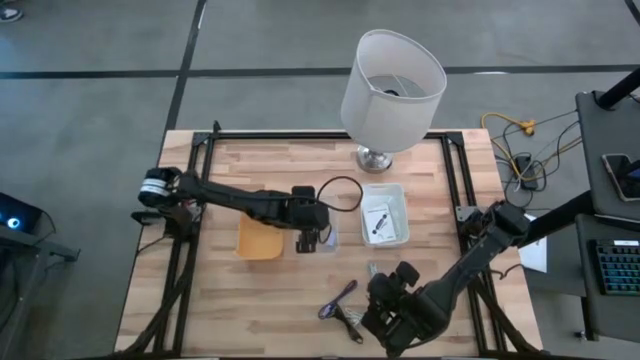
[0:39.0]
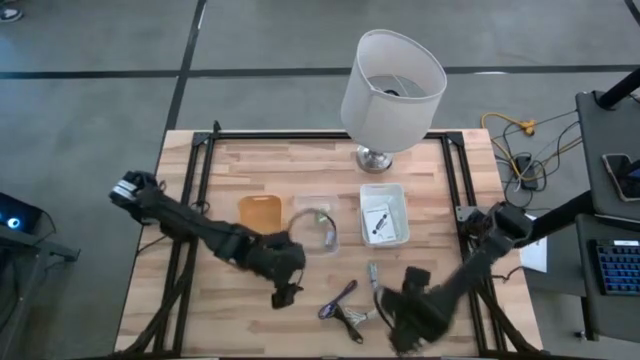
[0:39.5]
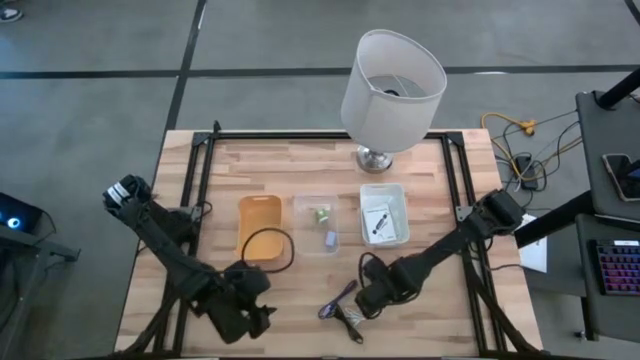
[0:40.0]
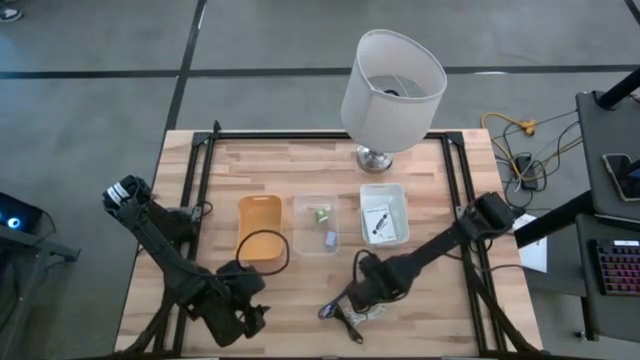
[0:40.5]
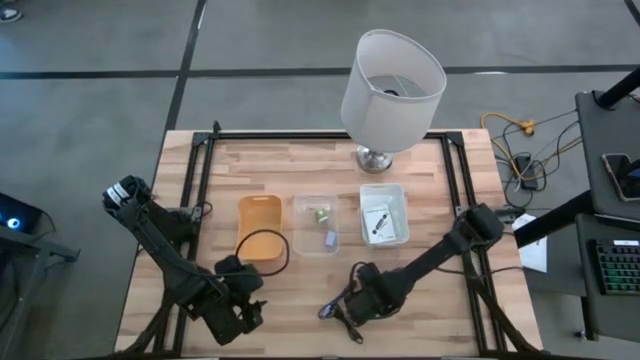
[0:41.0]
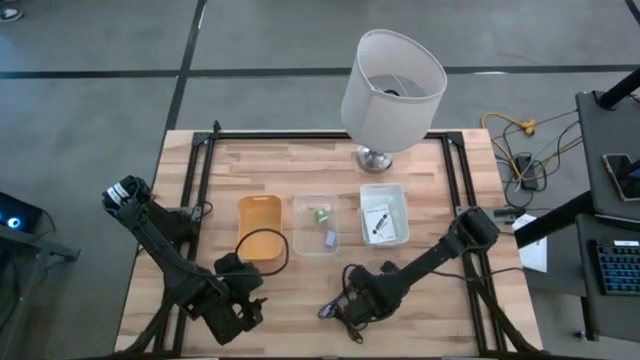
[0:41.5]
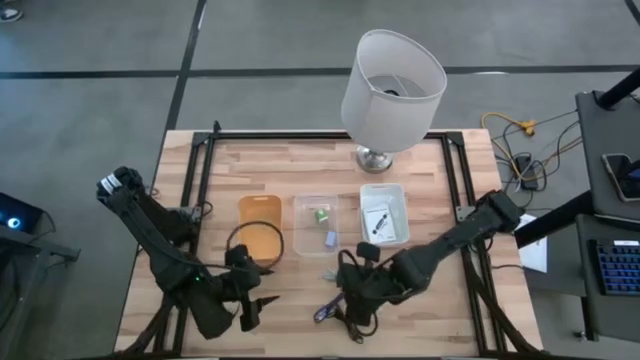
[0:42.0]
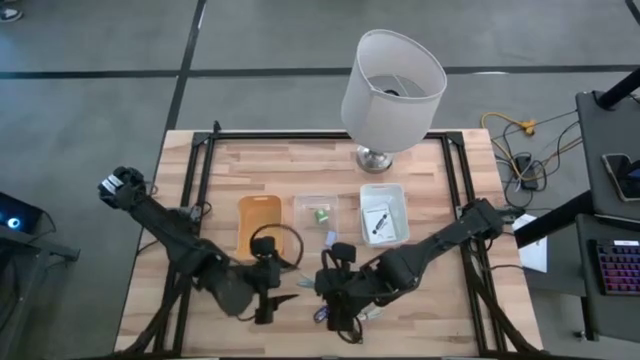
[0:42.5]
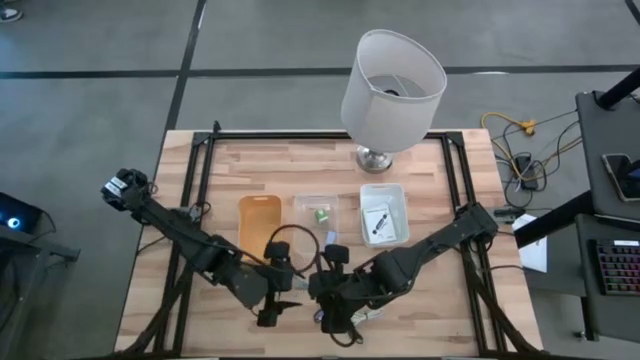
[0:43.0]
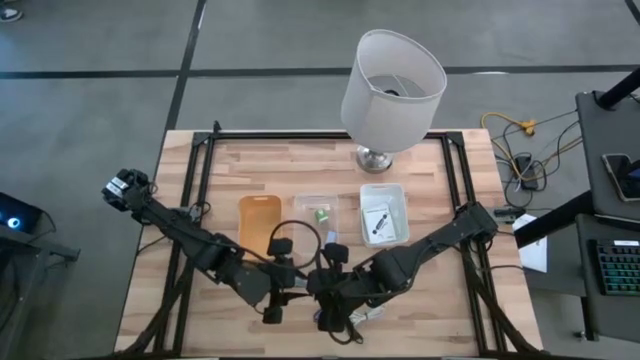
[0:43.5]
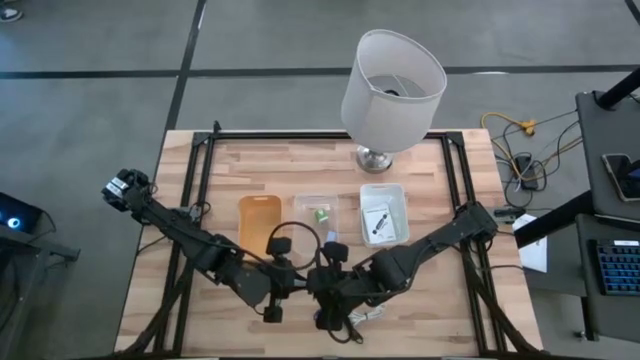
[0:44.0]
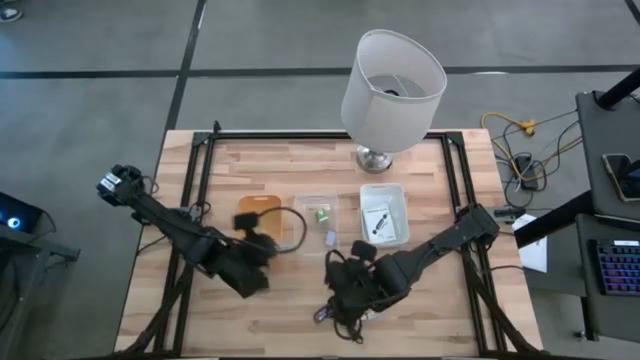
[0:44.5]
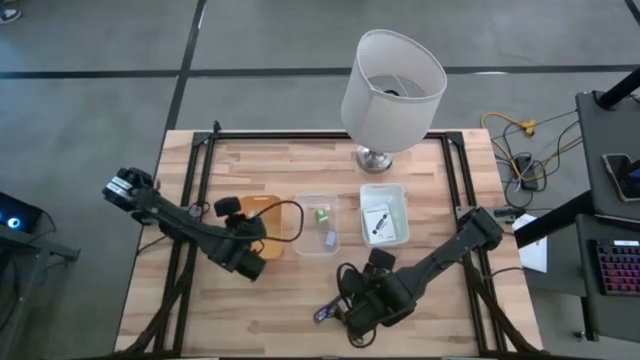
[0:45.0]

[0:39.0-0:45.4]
Task: Pick and place items into bin
Put the gray charger cable into the yellow bin

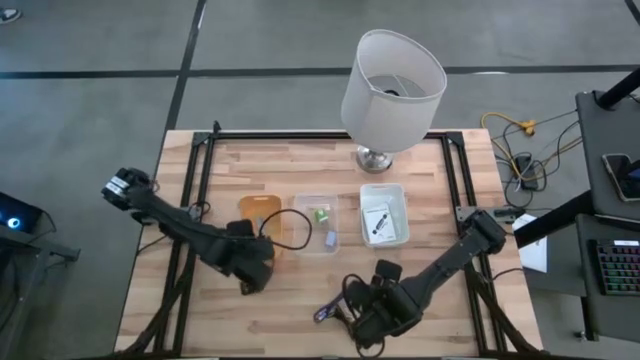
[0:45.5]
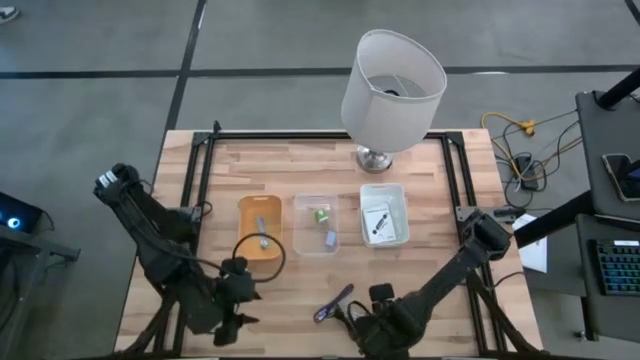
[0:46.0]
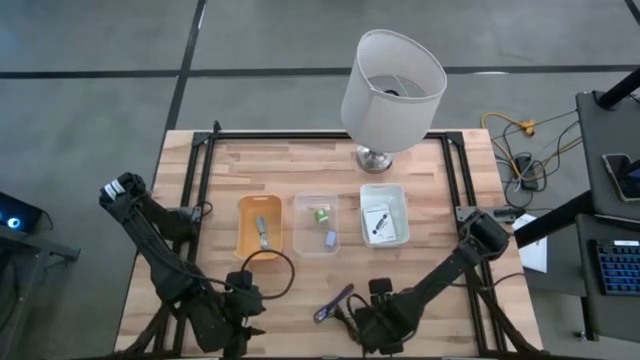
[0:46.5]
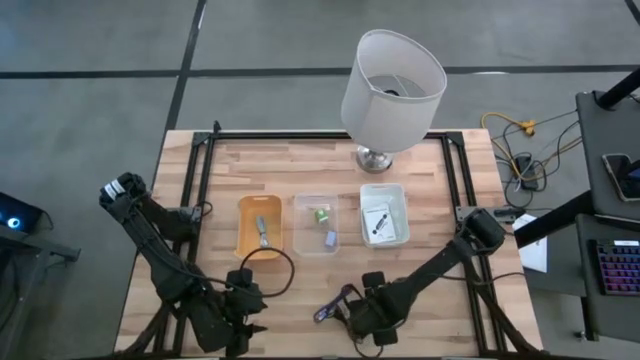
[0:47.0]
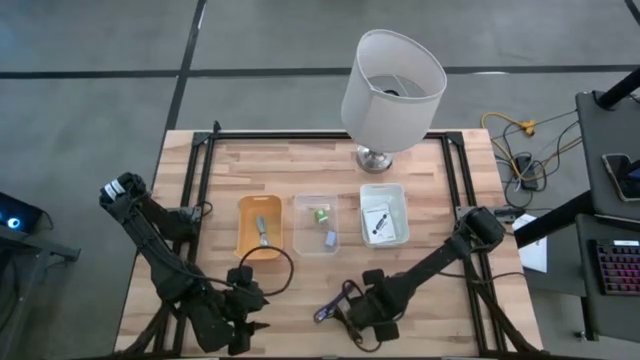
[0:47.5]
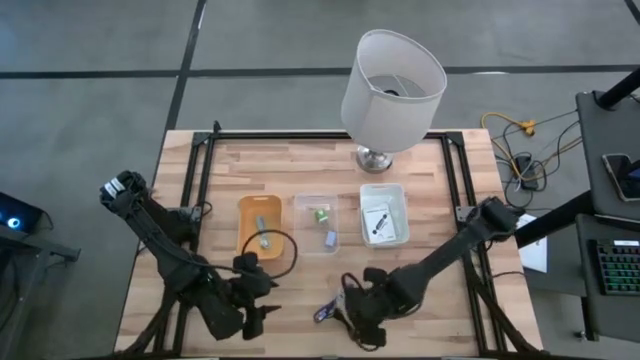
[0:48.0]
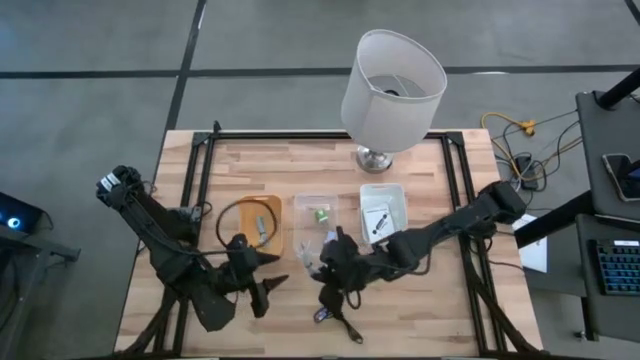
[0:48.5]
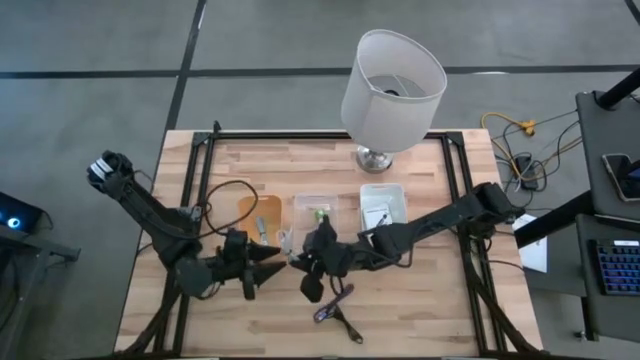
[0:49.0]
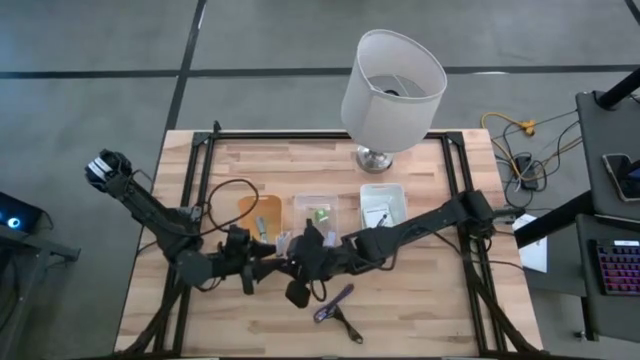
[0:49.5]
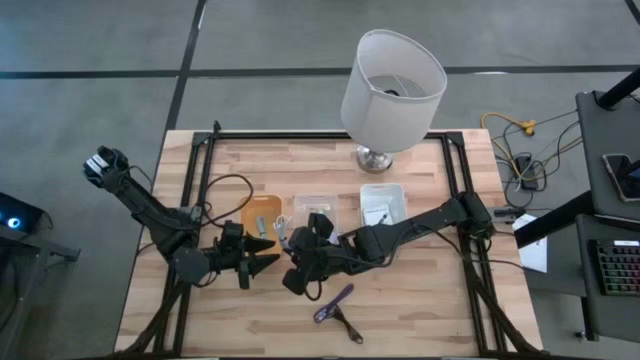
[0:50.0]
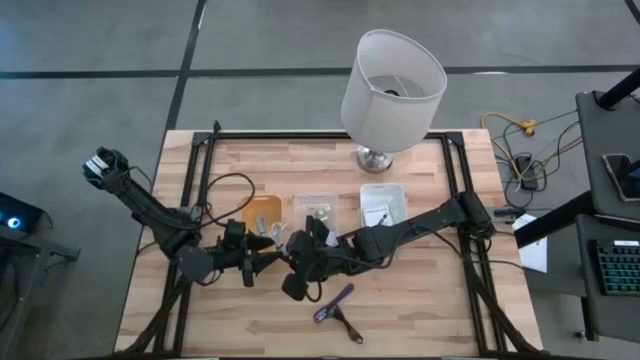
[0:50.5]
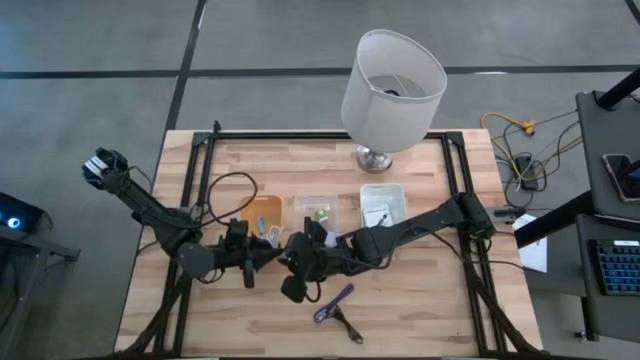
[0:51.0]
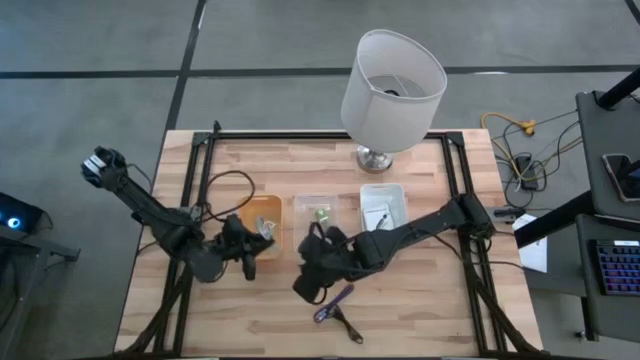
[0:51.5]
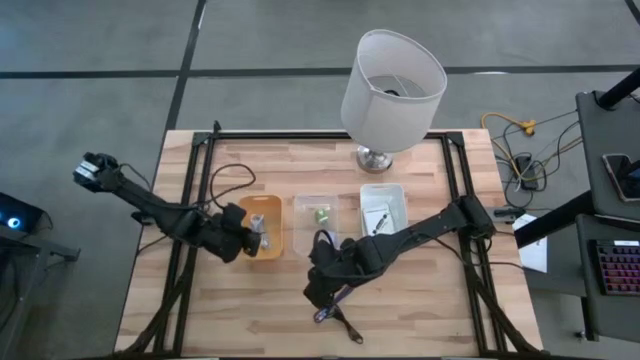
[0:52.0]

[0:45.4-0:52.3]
Put the white charger cable into the yellow bin

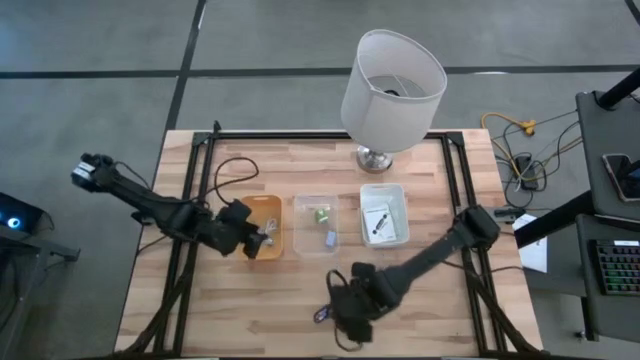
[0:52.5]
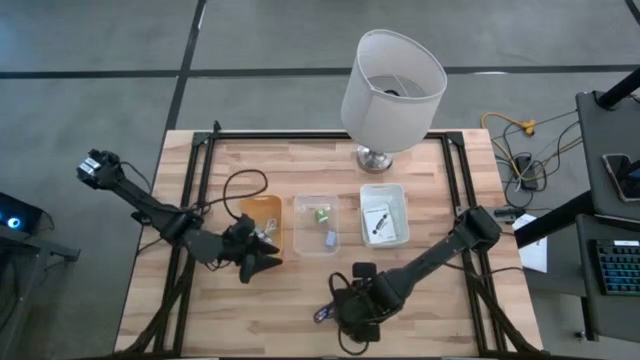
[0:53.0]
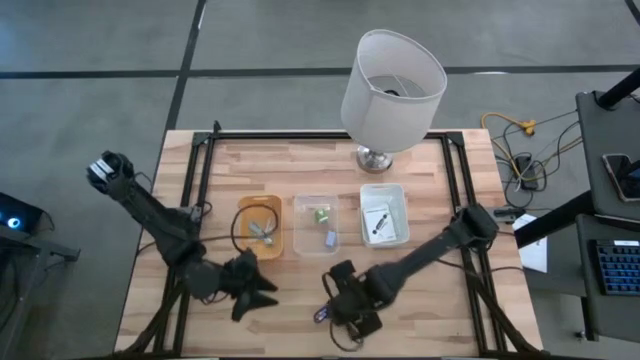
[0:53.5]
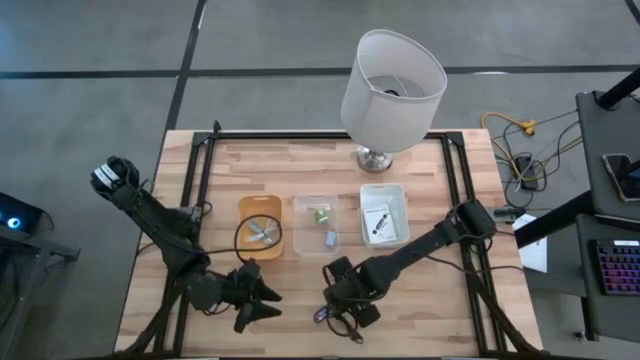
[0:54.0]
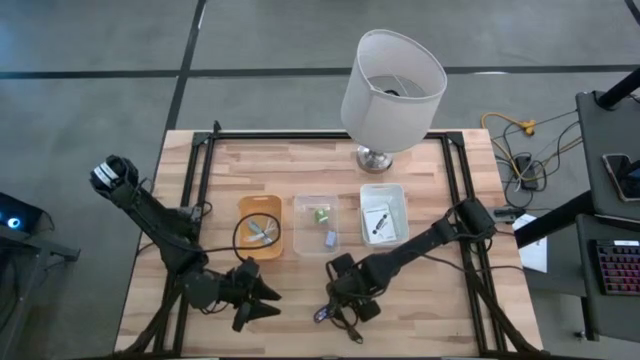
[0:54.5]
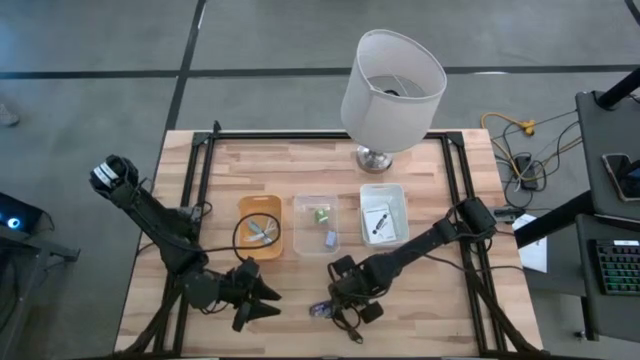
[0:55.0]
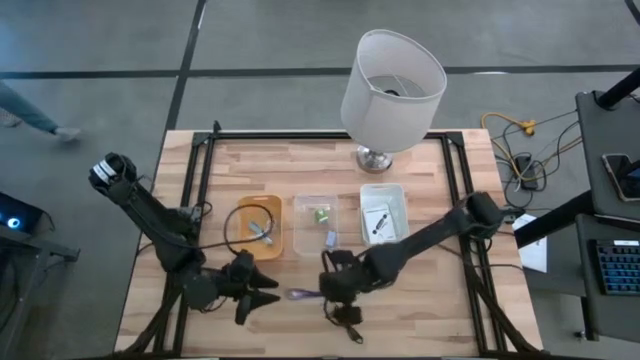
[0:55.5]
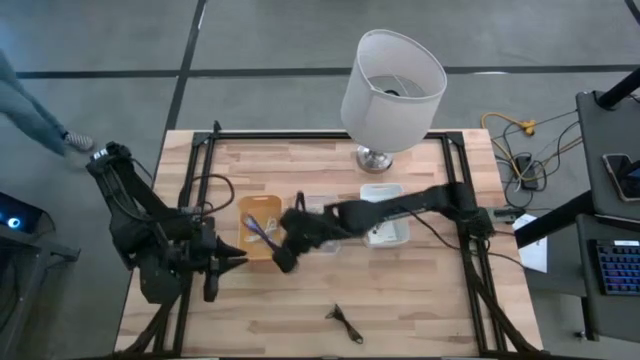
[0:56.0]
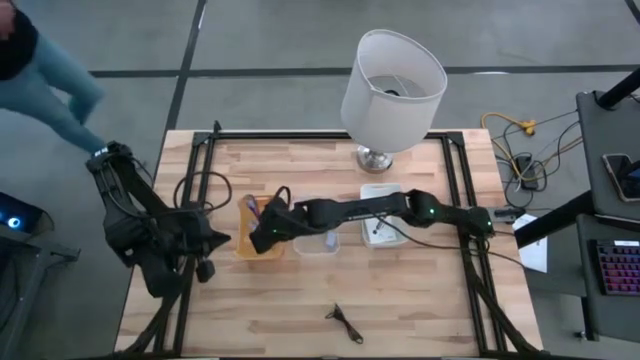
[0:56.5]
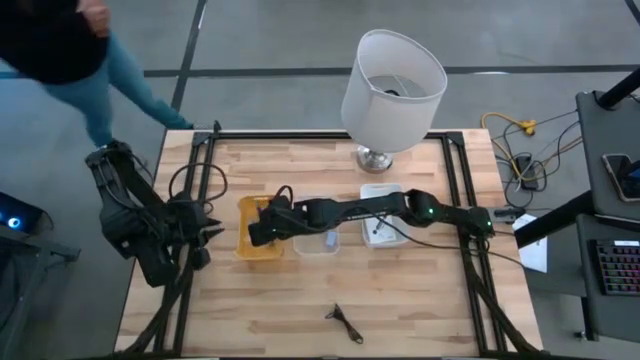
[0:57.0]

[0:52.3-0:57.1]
Put the violet charger cable into the yellow bin

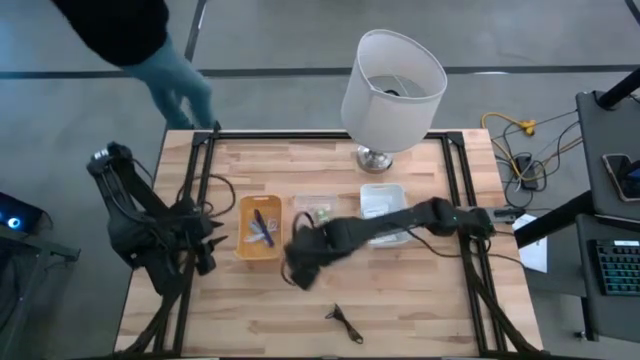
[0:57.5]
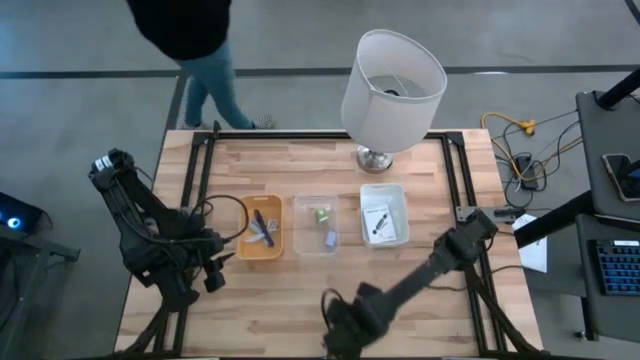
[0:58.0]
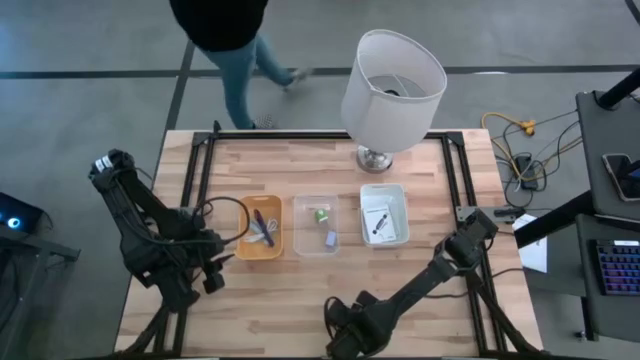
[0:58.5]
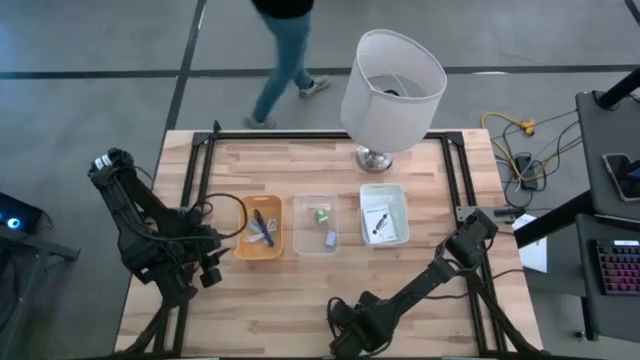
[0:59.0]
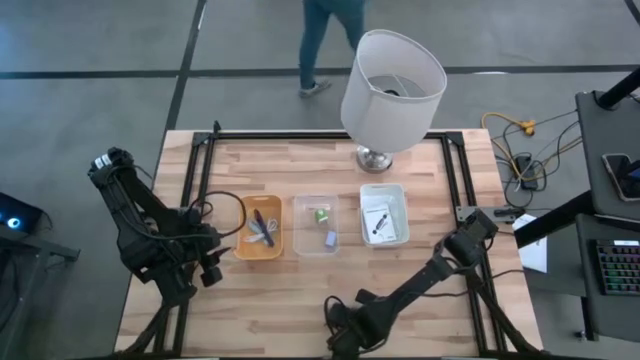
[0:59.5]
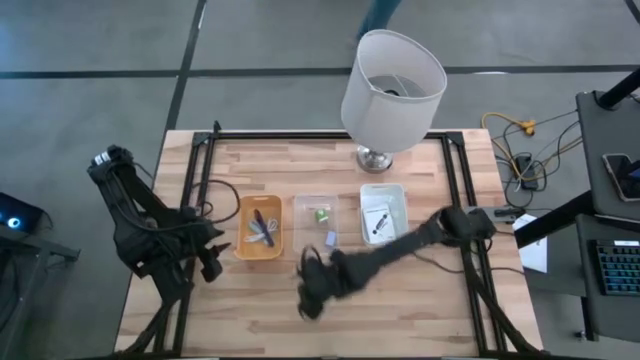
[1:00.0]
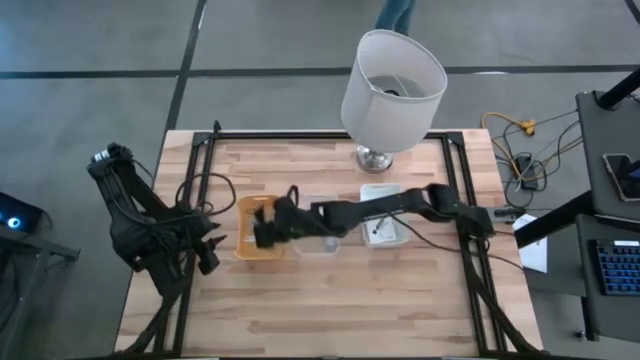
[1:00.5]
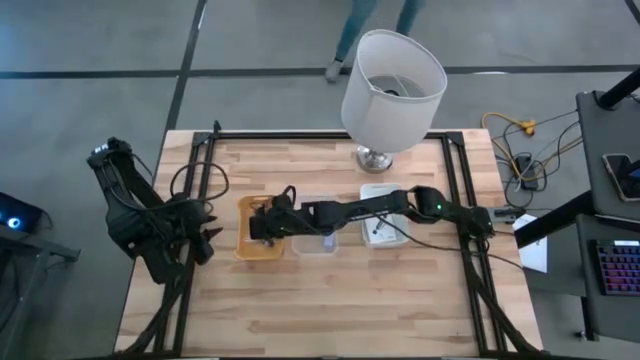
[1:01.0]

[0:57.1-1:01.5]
Put the black charger cable into the yellow bin
